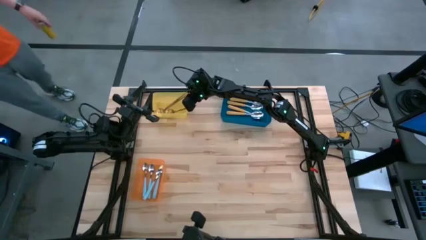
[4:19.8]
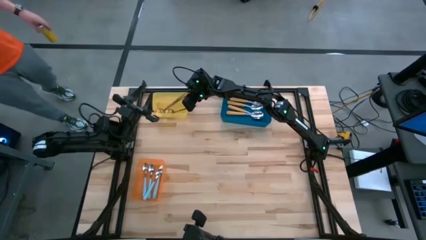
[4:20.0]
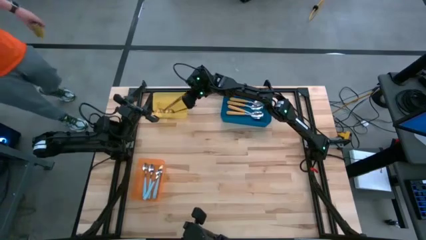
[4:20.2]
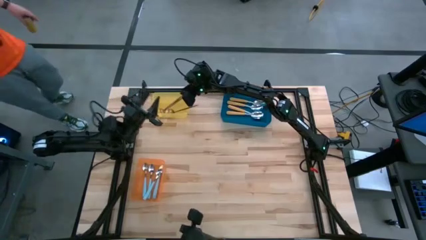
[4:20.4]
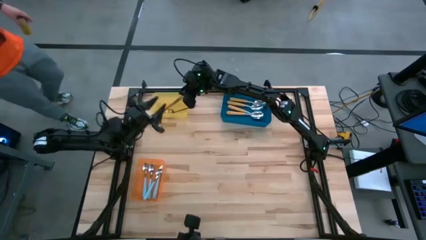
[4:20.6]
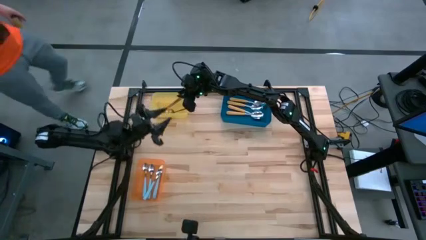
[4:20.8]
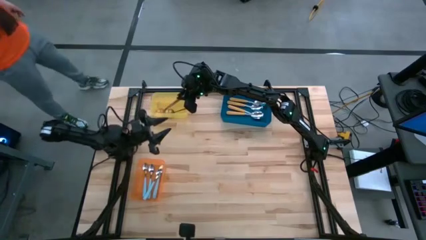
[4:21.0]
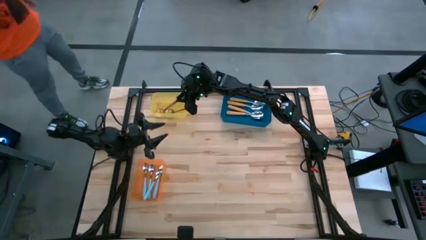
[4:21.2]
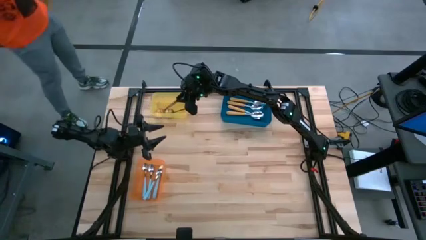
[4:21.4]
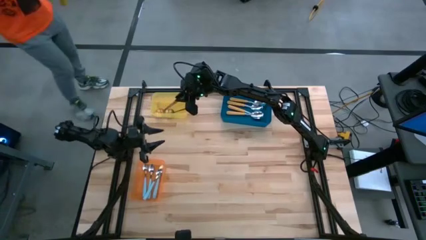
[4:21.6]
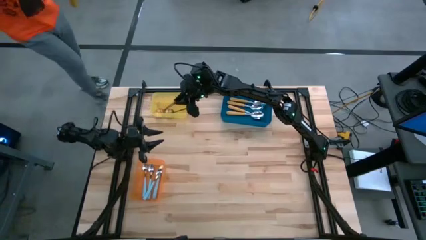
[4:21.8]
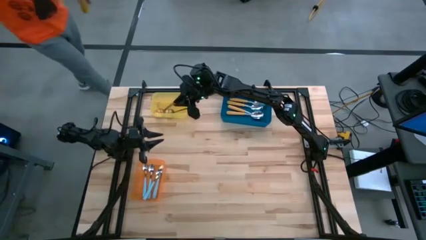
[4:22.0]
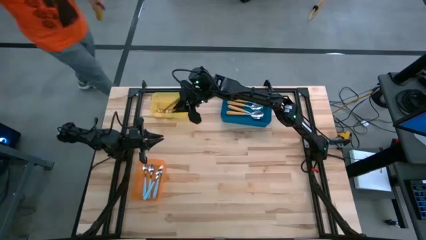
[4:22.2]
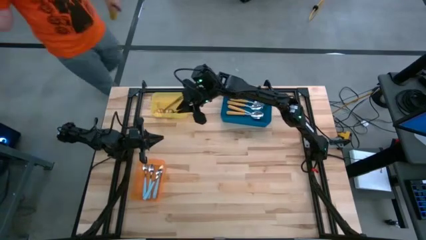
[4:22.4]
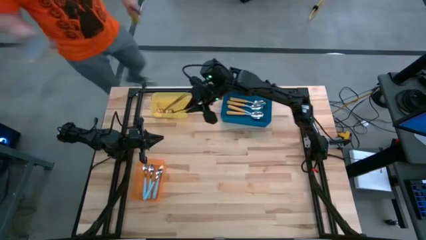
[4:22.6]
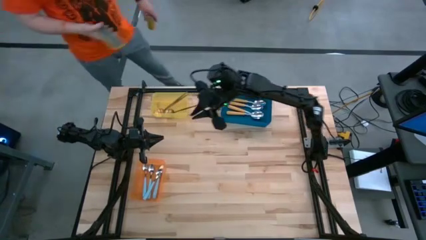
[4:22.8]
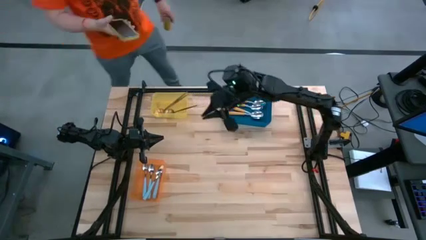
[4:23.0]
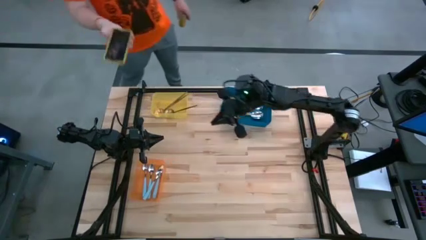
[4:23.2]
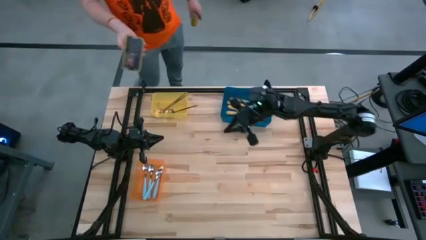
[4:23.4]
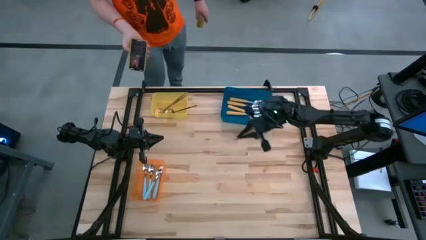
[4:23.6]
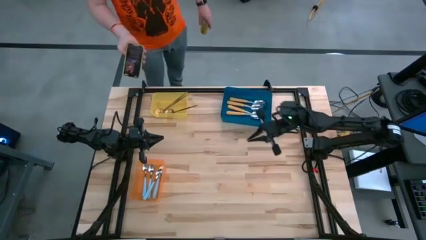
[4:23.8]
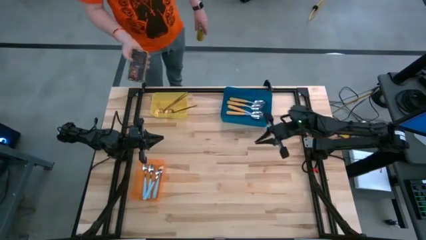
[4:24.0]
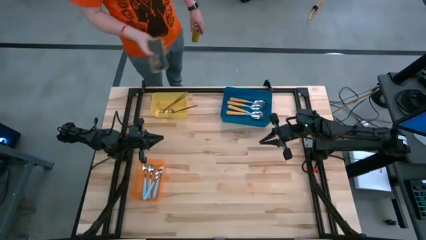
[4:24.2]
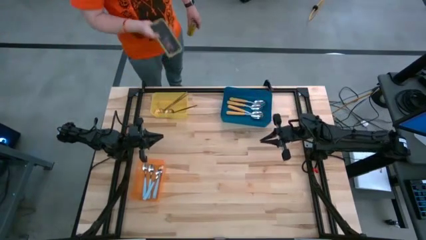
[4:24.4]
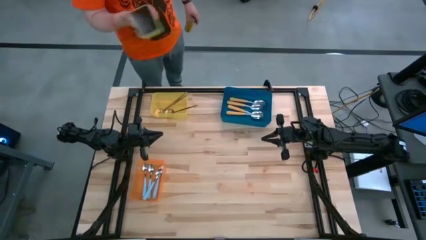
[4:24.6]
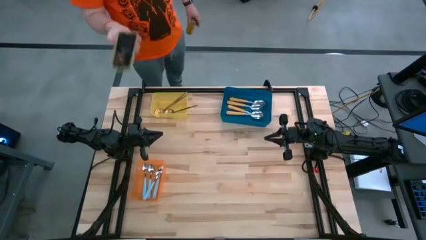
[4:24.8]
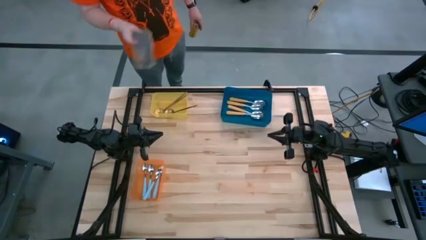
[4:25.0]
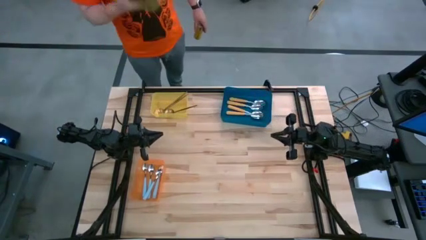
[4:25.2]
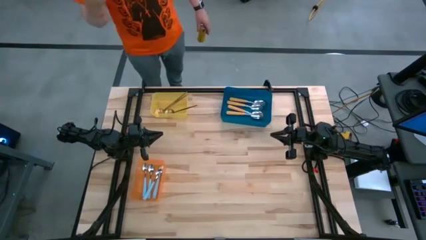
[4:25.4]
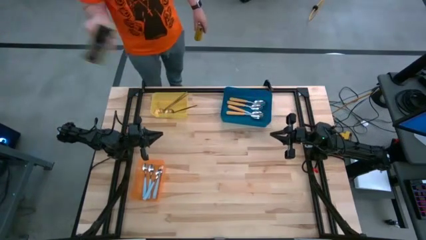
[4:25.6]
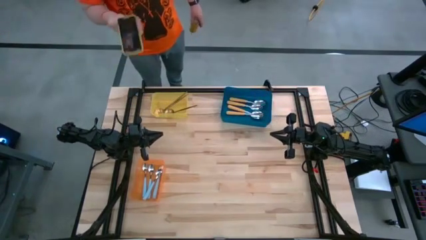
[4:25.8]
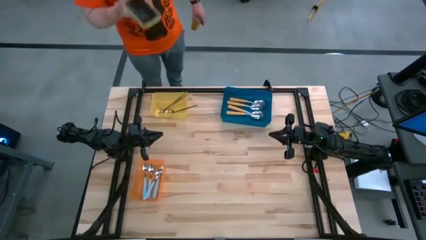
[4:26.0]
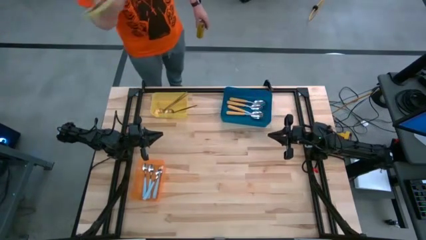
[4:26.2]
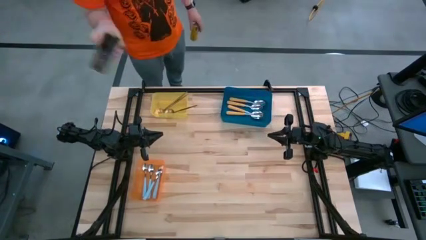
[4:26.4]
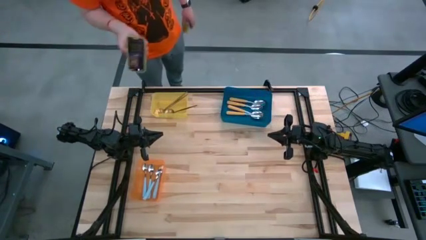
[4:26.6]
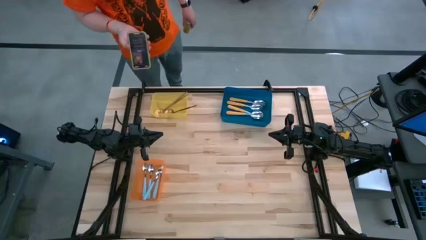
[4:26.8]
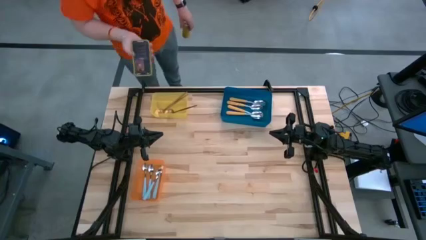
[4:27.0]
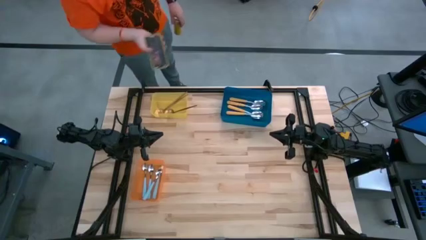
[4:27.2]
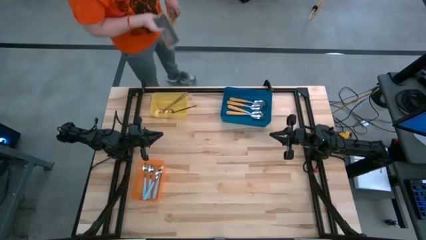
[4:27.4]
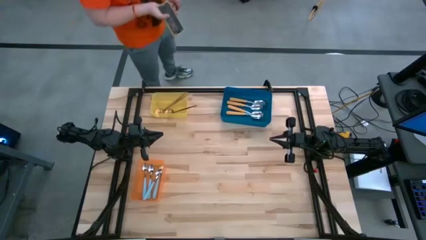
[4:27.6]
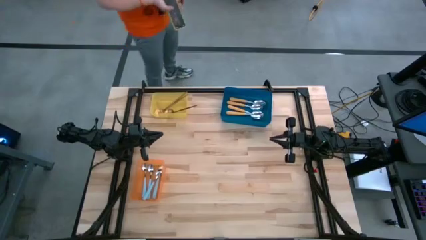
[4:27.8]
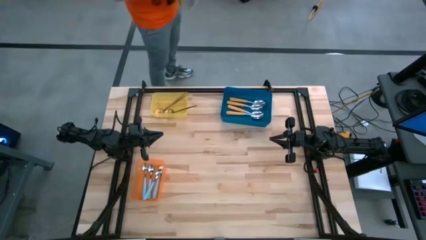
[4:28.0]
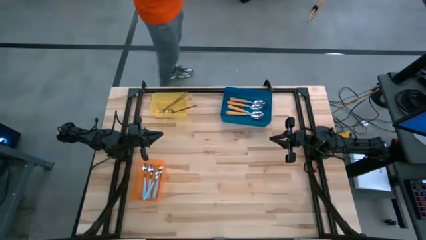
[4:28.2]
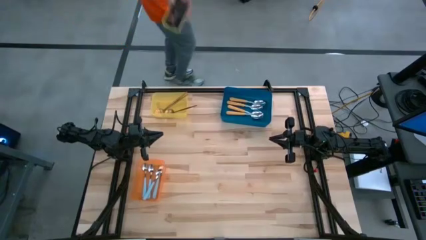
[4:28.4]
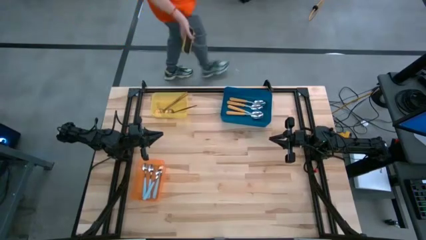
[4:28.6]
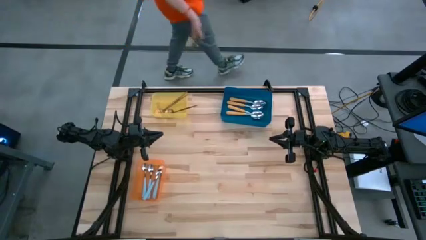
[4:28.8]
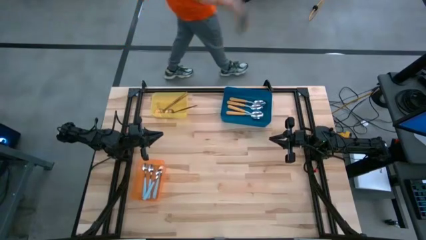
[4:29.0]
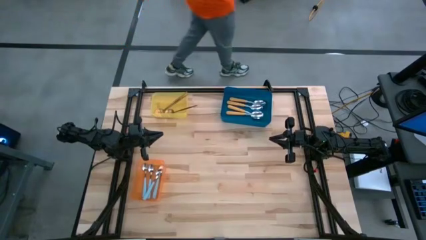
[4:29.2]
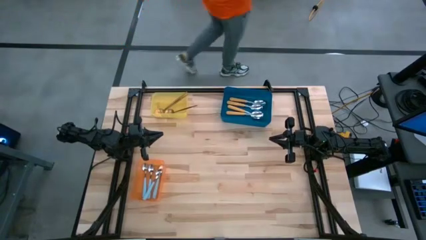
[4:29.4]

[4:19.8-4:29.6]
Task: Sort silverware by color (type)
Return to Home Position

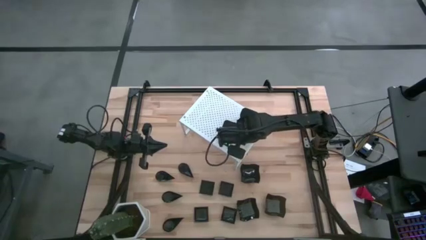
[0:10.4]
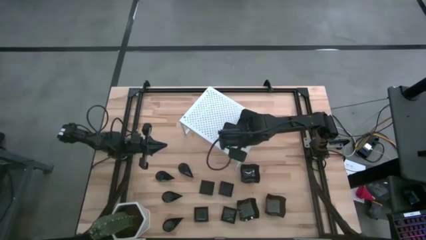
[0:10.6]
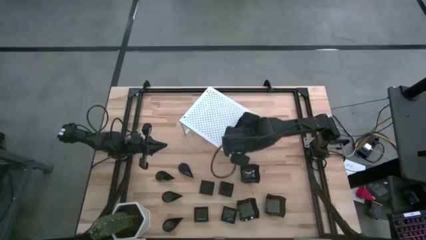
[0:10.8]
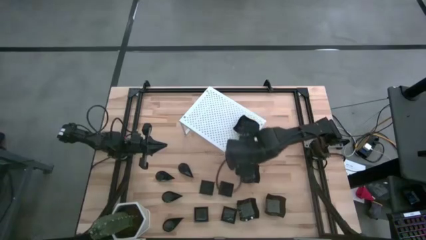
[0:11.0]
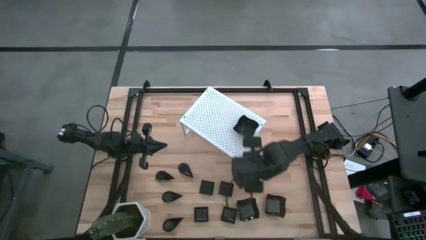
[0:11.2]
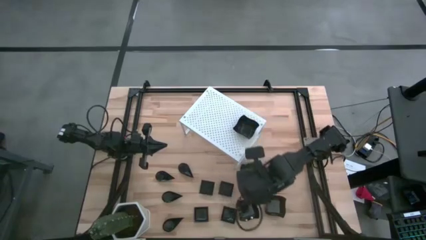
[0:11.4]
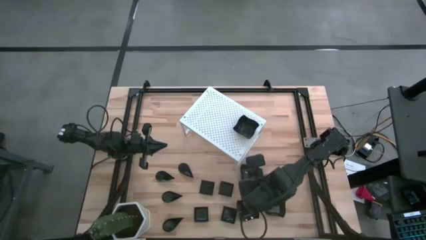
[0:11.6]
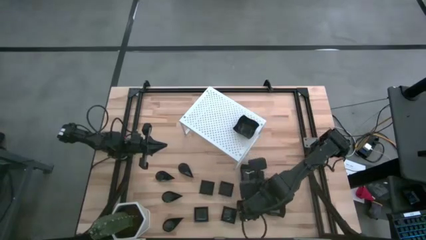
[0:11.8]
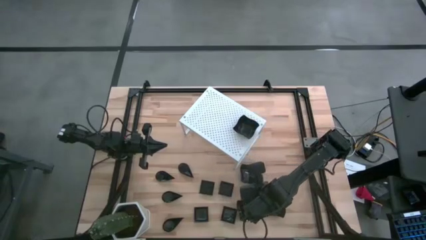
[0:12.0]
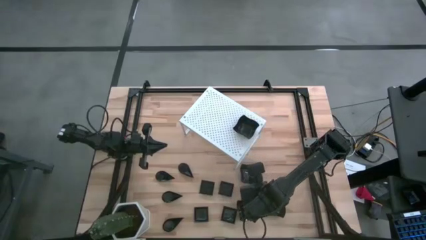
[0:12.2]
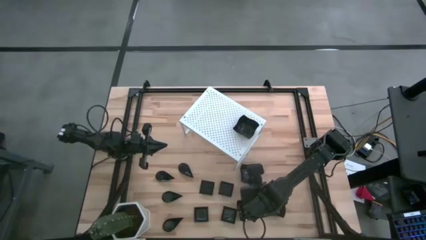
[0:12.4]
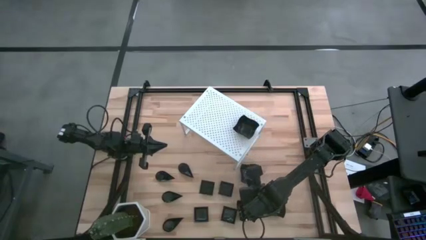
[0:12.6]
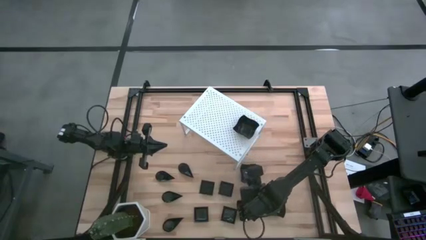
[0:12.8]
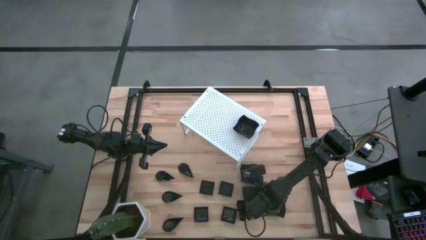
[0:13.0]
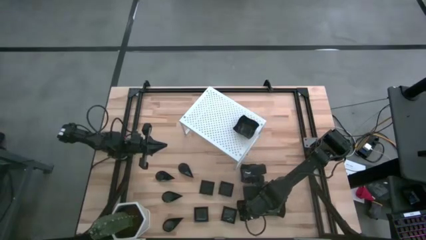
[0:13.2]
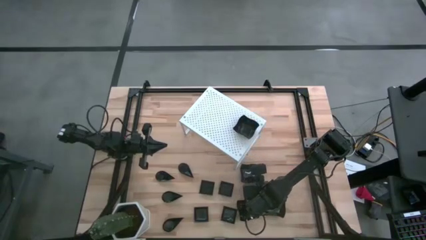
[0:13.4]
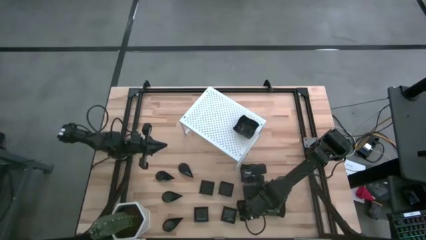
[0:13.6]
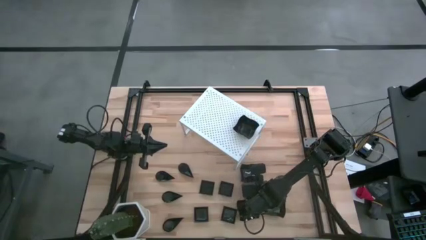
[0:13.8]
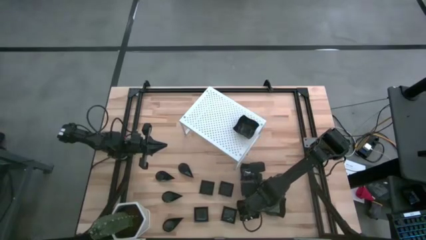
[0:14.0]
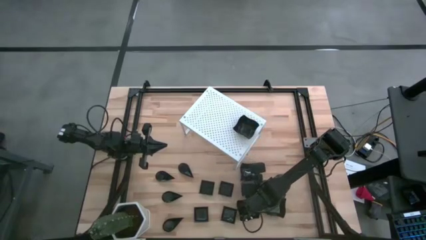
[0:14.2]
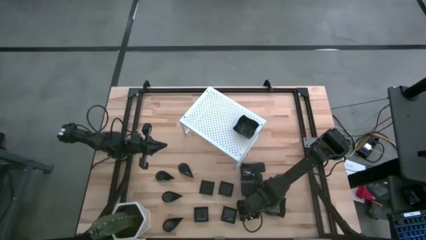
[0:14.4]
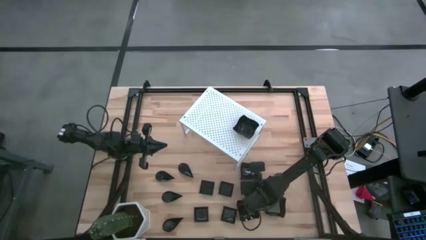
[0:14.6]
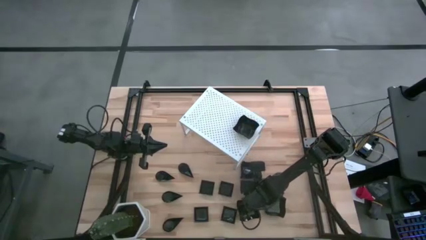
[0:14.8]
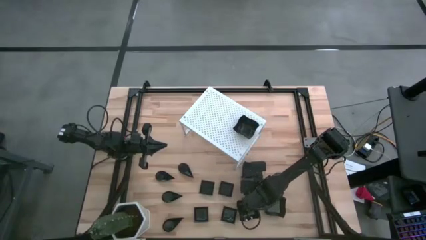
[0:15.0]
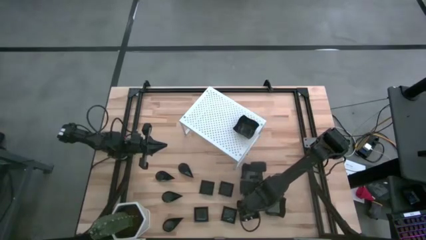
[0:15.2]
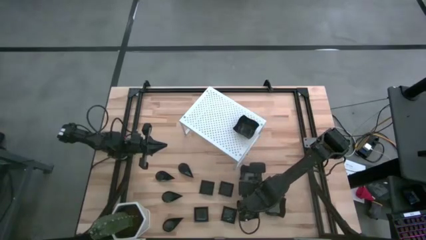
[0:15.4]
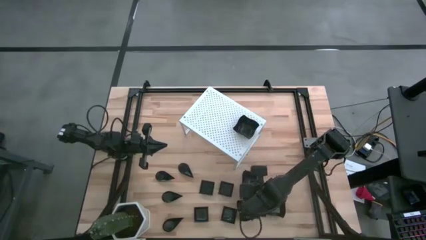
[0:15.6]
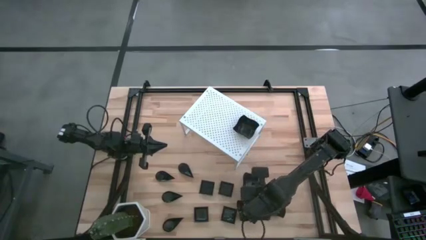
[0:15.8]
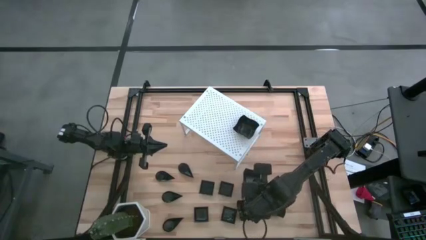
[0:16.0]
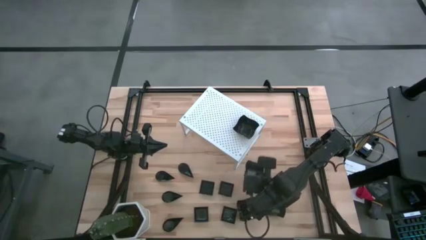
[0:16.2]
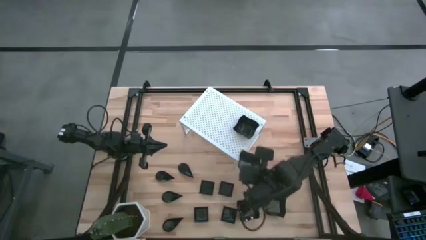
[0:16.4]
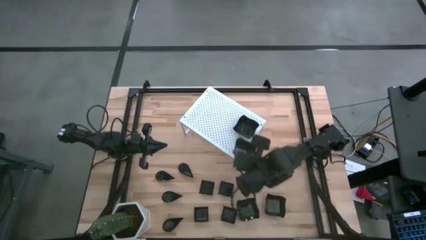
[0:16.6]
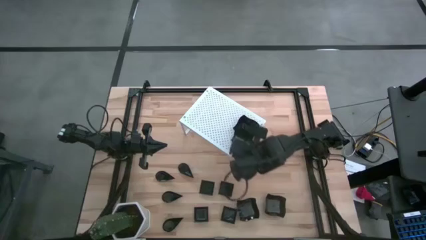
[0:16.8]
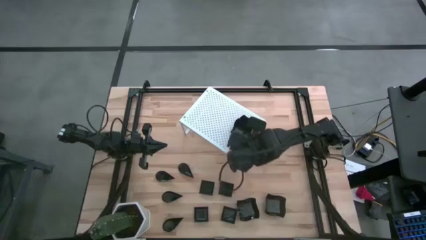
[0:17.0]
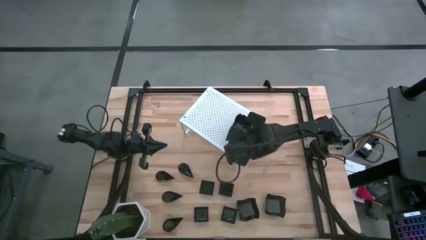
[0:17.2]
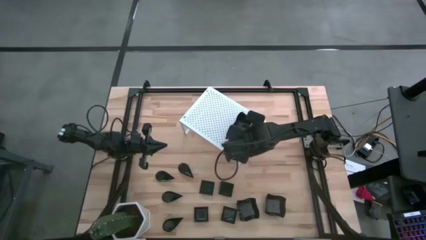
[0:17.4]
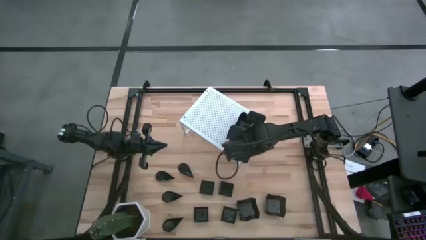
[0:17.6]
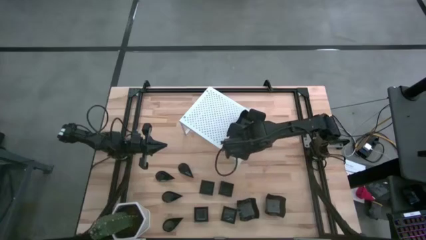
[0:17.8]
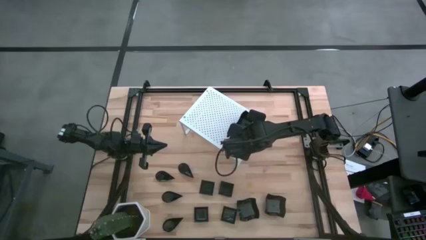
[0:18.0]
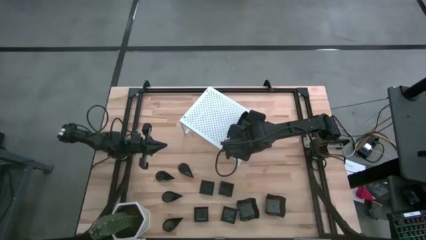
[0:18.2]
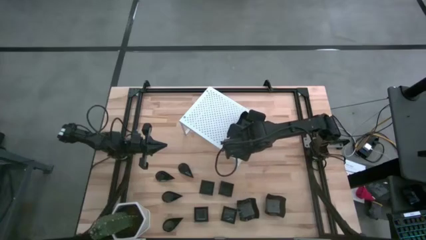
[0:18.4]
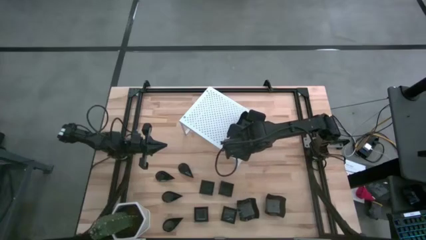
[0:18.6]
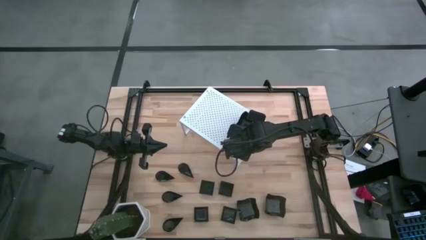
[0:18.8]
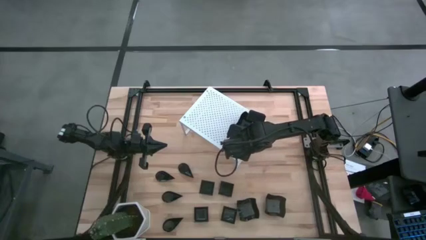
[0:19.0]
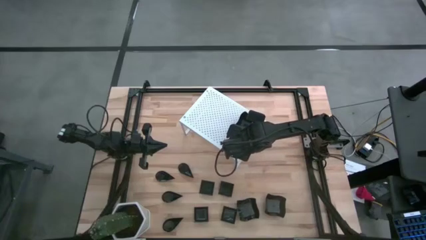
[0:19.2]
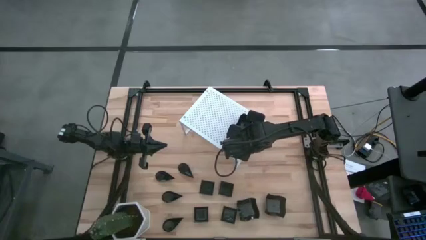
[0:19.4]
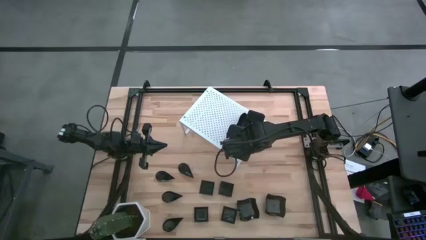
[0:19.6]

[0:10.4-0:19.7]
Task: Pick & Place Mini shaped plates
Stack the distorted square plate on top of the other distorted square plate on the shelf
